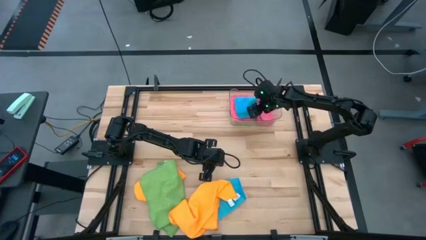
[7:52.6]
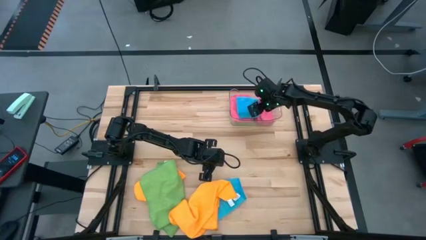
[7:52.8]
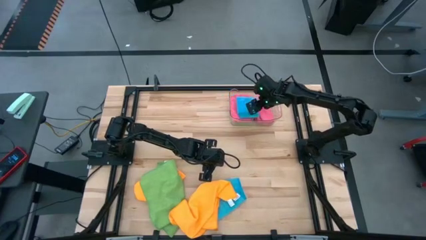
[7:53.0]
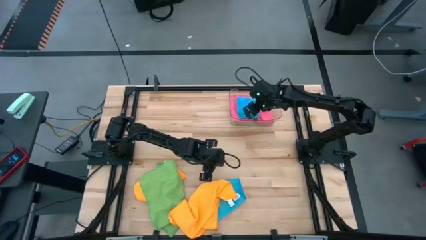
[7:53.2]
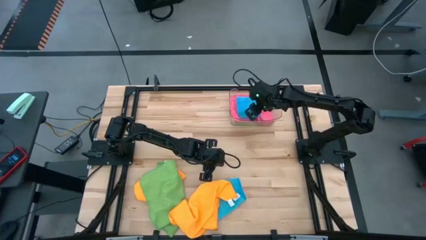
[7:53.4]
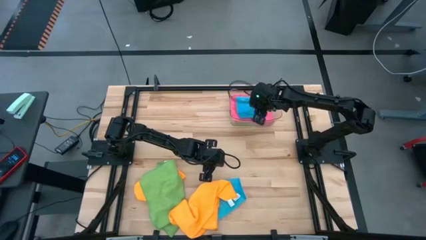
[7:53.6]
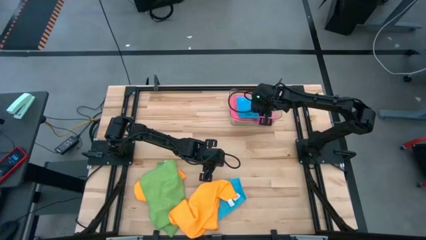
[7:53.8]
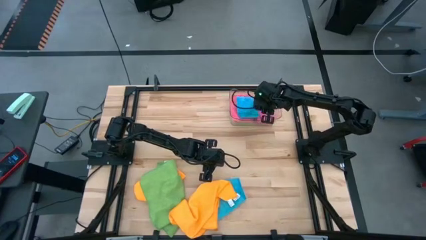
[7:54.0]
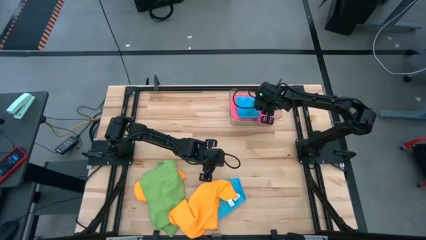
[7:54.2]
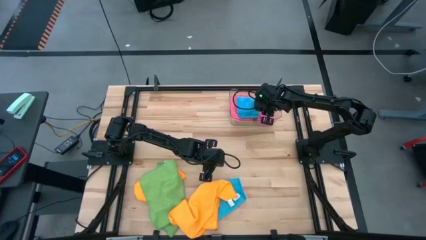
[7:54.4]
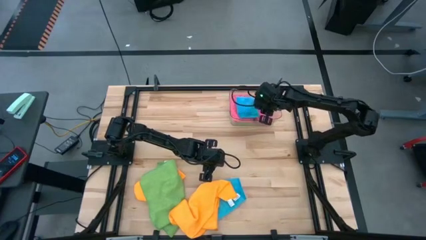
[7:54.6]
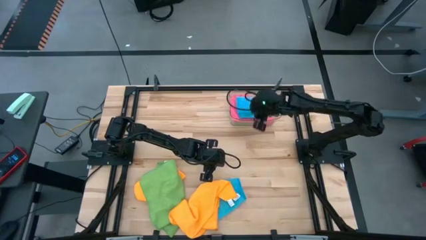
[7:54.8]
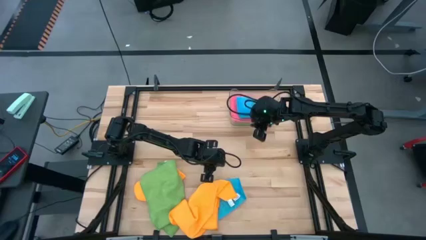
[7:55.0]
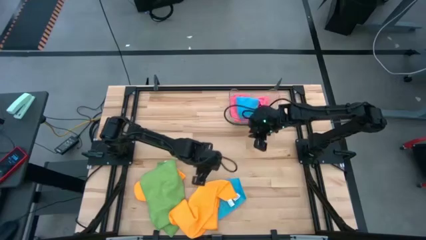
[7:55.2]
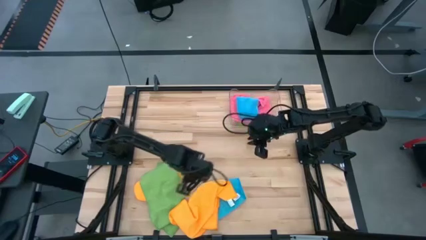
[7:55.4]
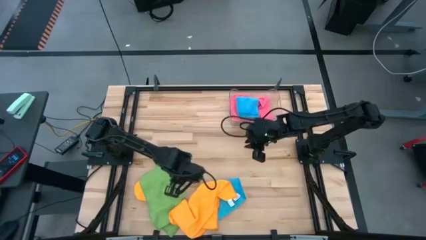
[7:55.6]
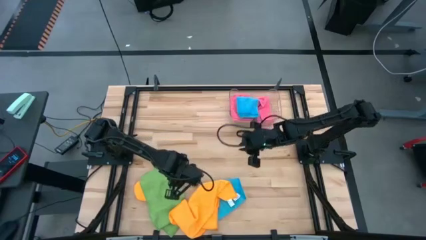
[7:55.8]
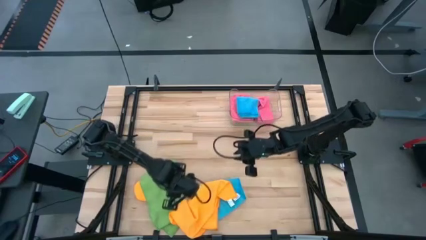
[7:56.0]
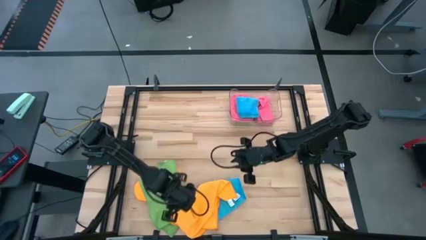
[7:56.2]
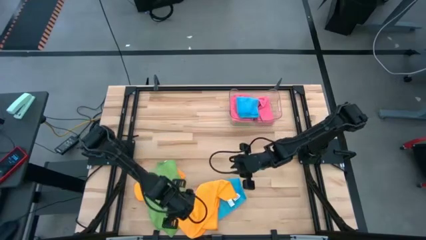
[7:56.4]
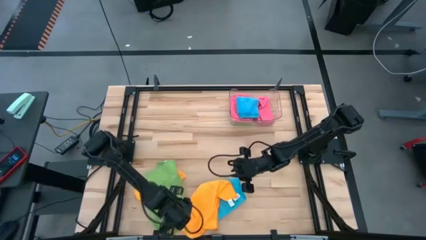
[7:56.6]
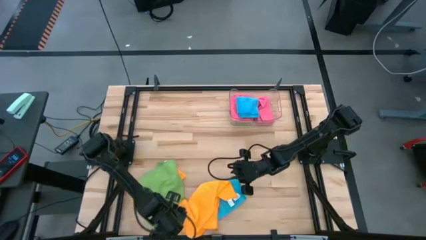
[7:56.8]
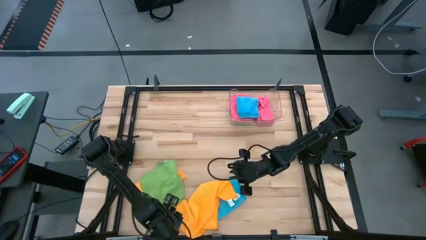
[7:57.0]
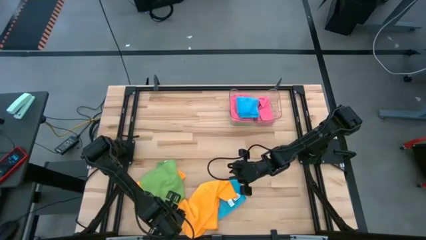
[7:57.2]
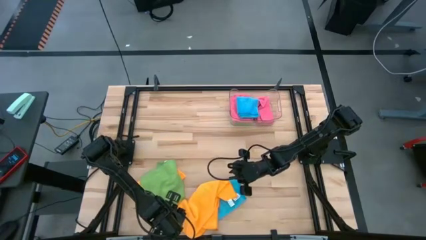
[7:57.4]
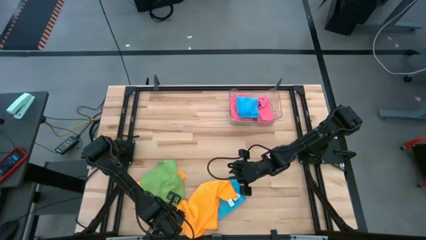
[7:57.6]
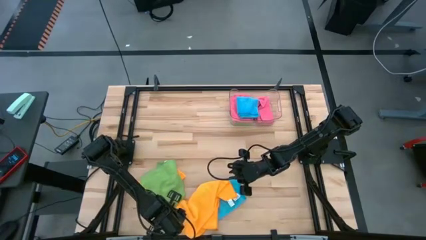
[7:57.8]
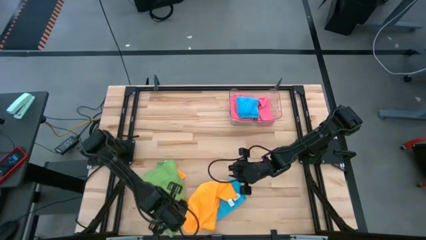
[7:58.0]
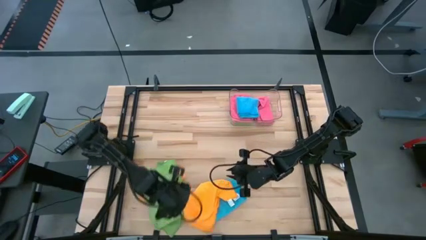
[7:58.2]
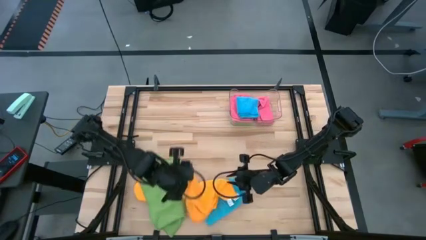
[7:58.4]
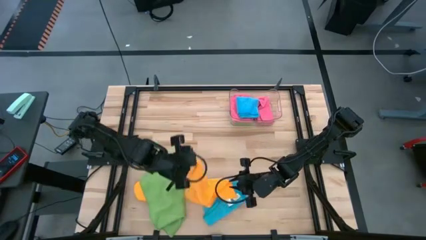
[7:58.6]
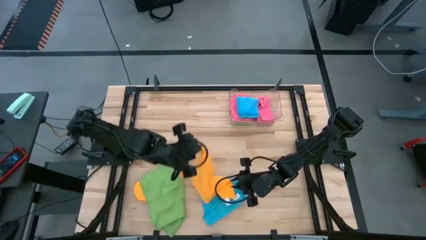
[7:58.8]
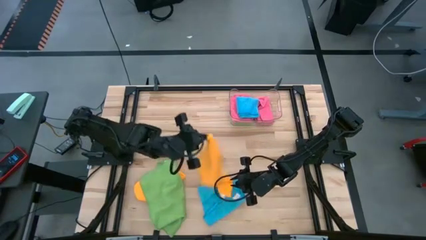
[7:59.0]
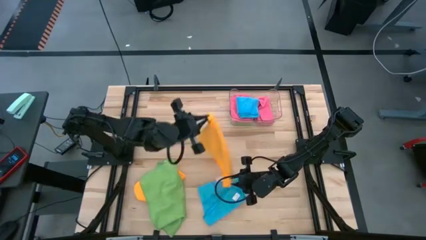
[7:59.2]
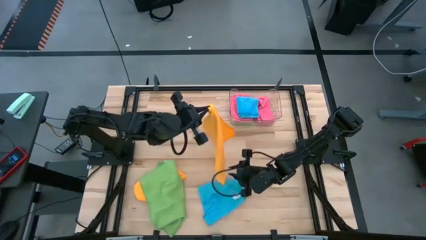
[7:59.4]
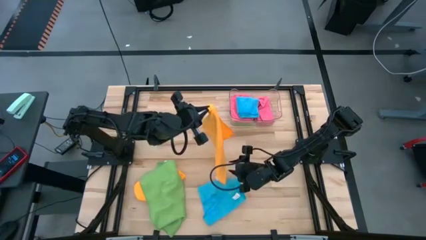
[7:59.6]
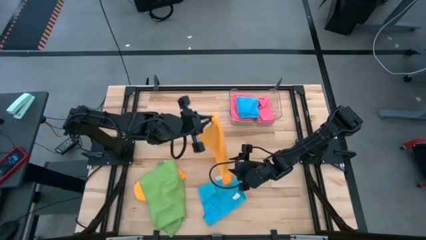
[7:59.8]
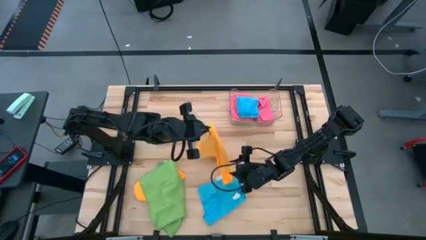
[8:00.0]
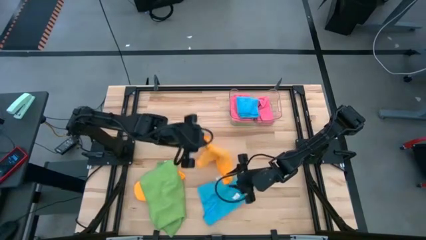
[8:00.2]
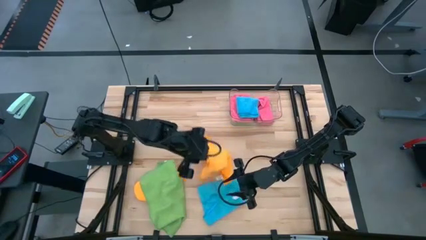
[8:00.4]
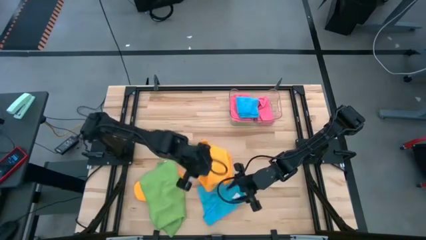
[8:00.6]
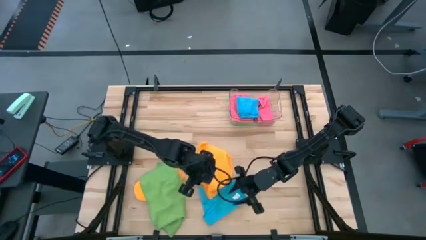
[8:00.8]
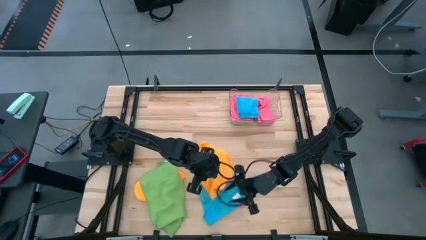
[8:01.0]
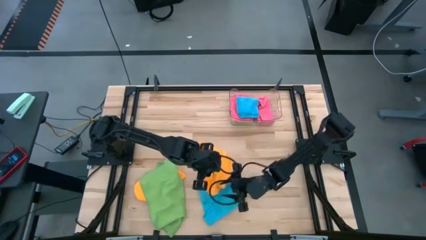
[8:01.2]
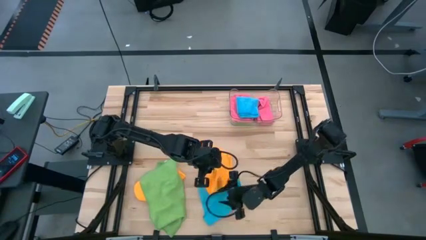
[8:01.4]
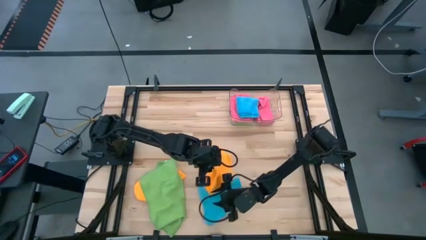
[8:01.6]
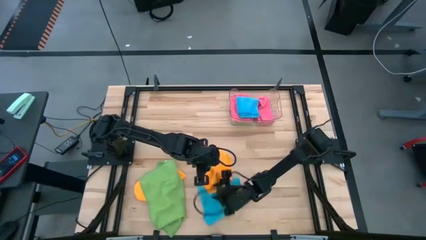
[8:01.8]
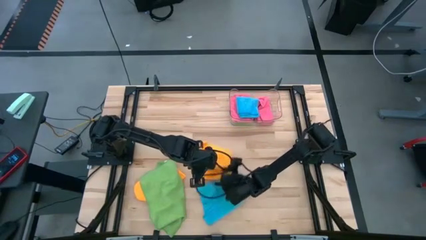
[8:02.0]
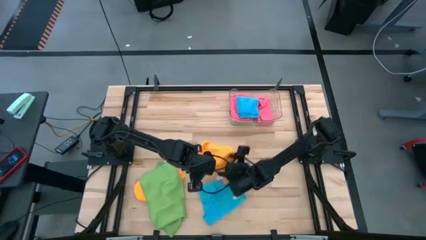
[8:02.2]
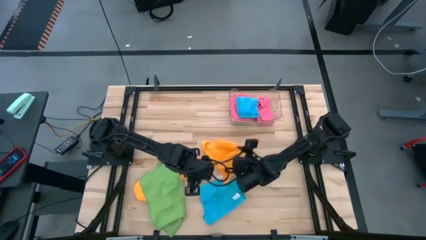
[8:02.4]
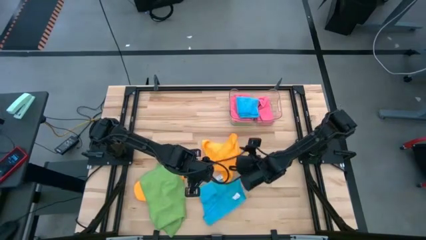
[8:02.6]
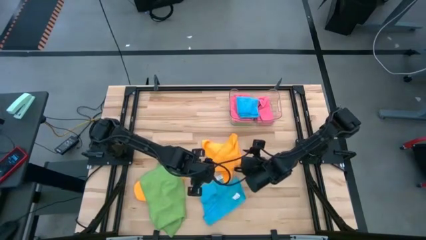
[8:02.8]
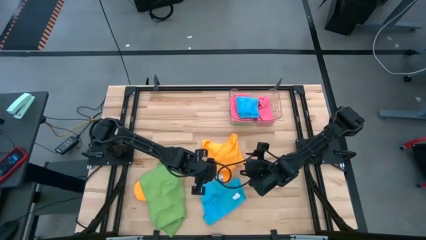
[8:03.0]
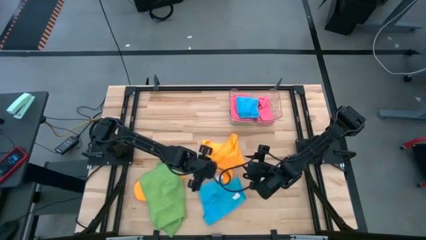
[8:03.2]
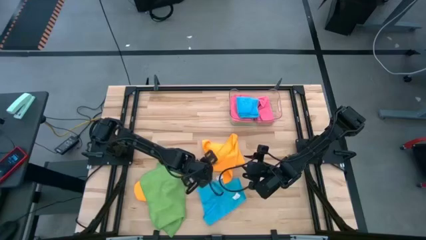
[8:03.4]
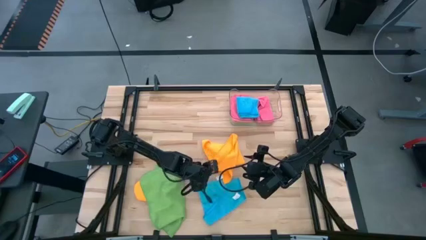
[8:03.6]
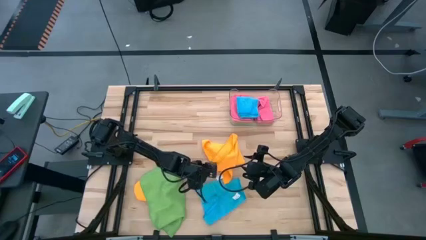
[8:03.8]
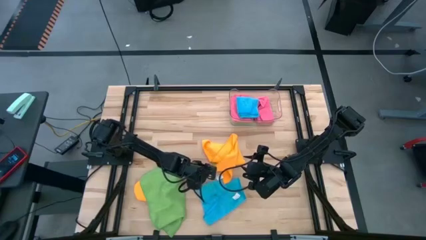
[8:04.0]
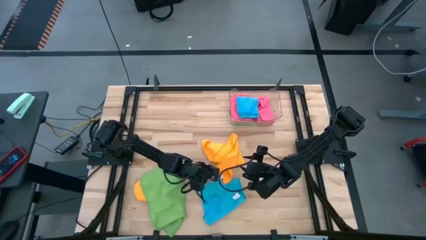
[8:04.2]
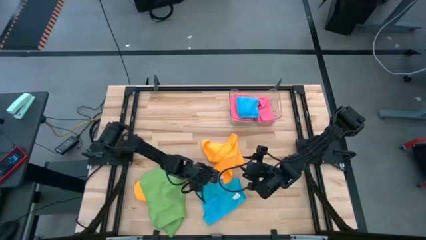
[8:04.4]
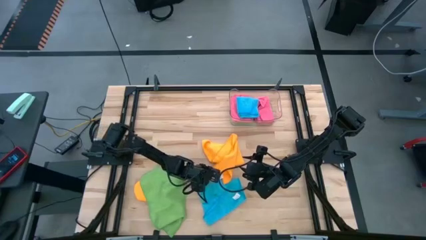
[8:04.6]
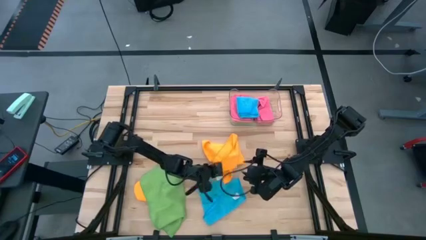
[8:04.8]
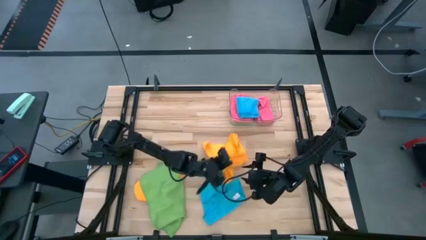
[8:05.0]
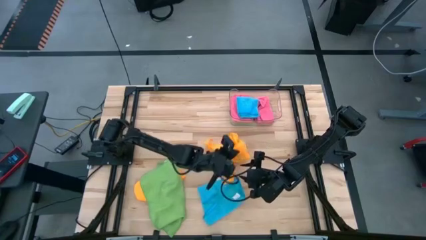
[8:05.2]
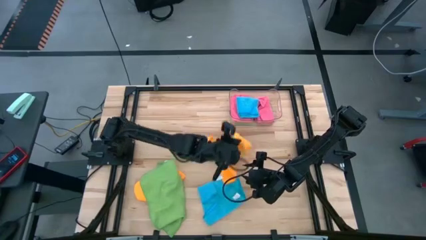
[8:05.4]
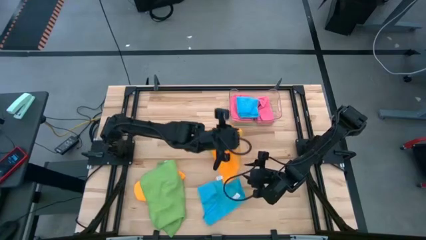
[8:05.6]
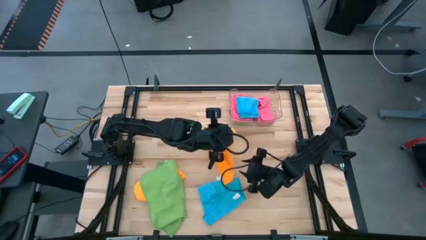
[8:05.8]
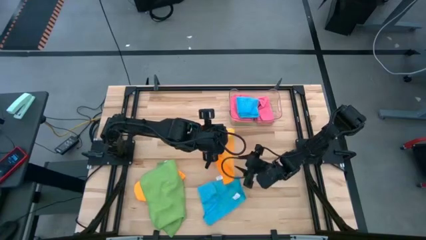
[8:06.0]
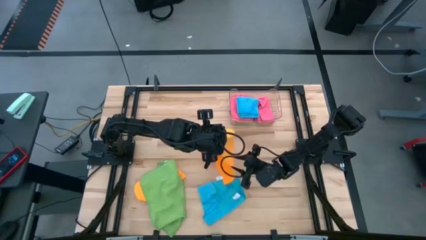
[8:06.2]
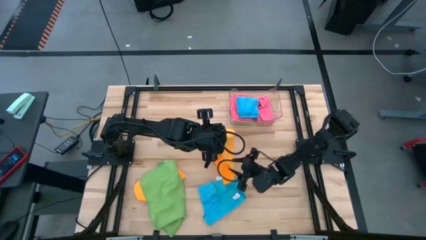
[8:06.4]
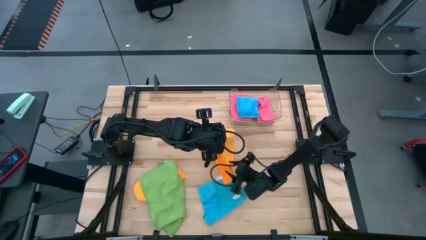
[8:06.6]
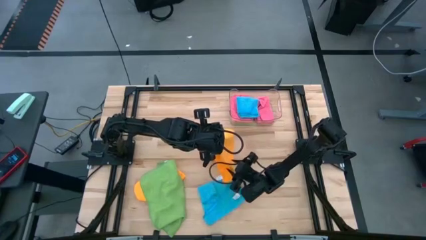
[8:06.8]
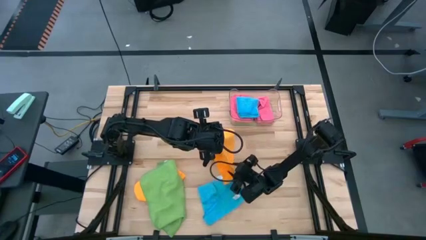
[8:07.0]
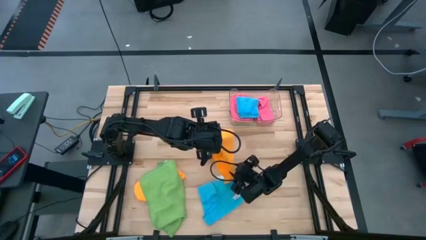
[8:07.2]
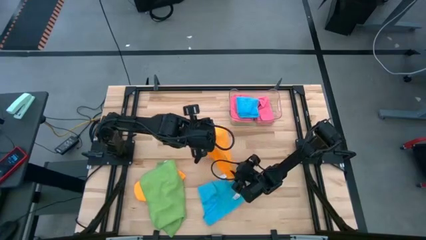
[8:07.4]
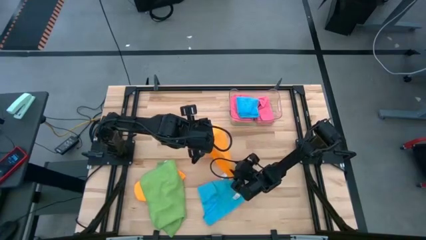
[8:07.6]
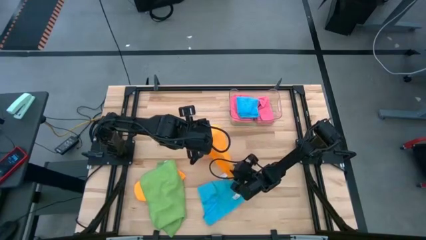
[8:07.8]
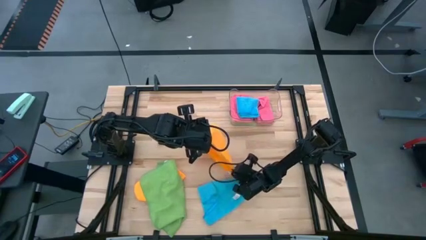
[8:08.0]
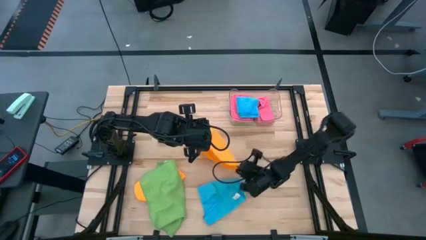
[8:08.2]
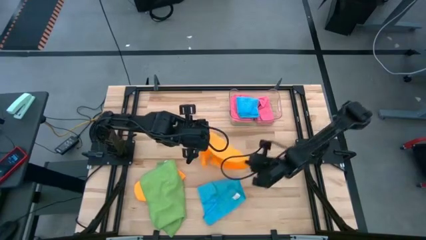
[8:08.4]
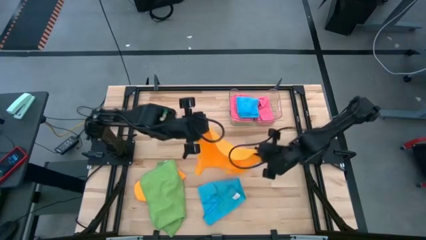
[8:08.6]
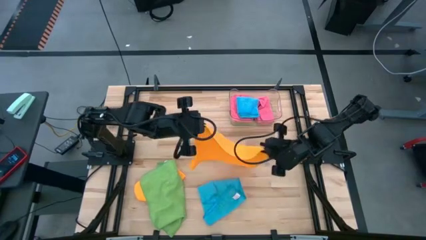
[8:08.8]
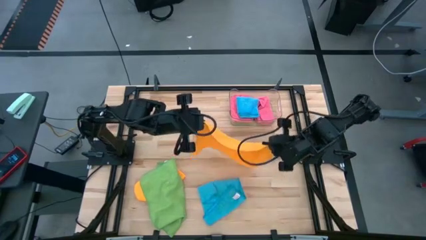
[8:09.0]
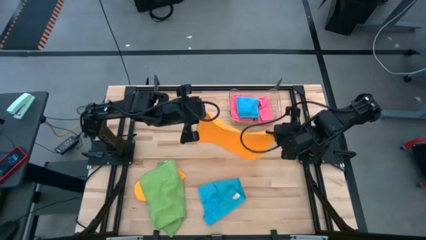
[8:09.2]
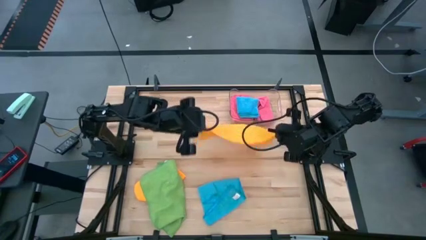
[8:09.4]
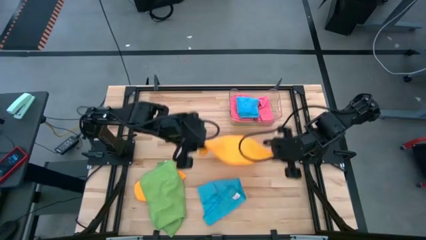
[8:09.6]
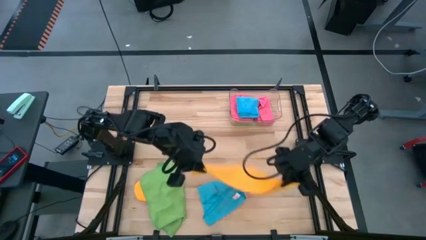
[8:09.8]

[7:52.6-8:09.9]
Task: Fold microfiber towels
Fold the right yellow towel
